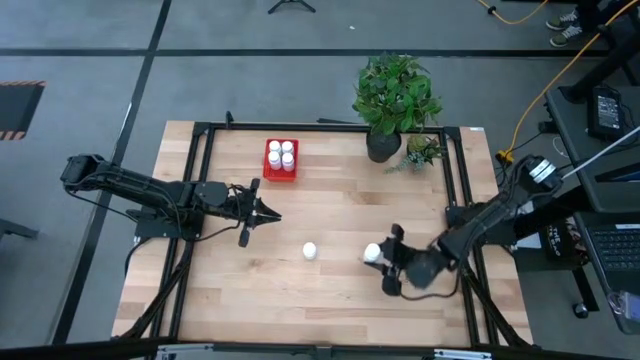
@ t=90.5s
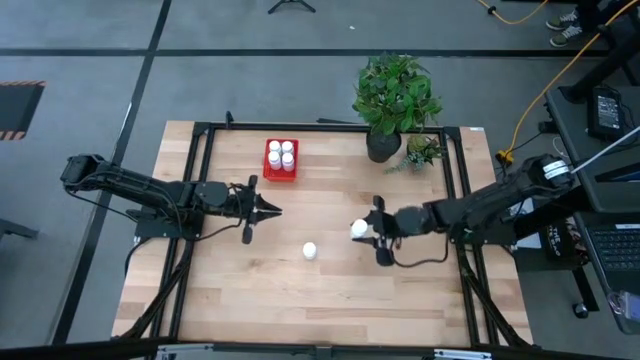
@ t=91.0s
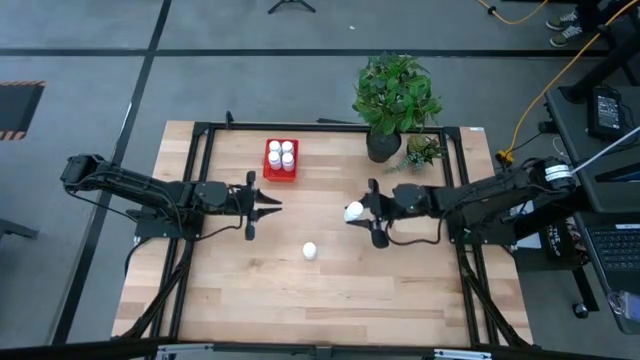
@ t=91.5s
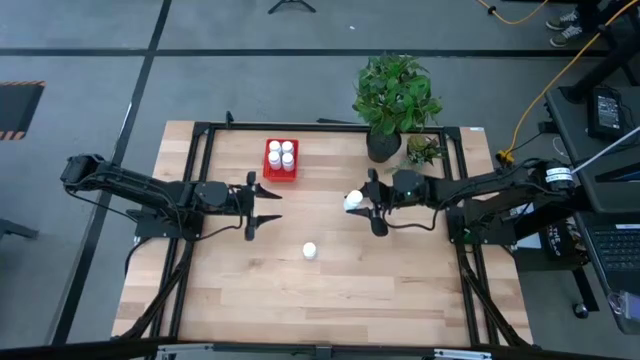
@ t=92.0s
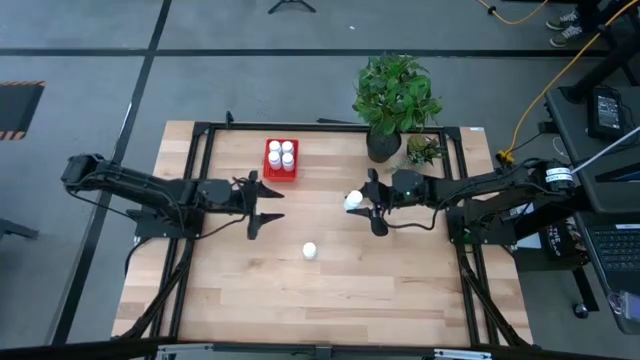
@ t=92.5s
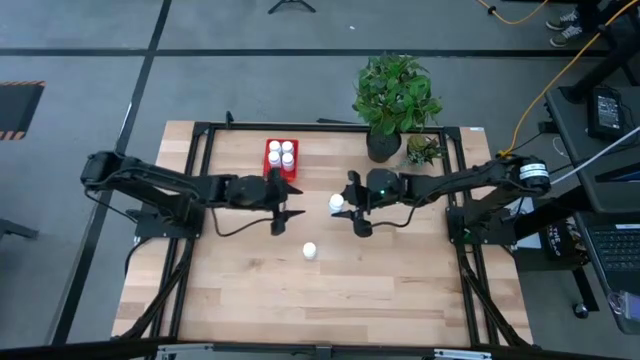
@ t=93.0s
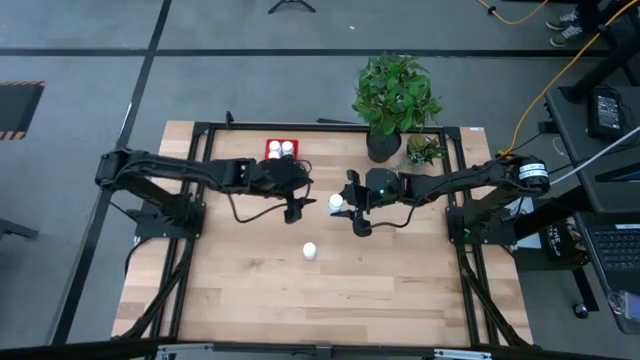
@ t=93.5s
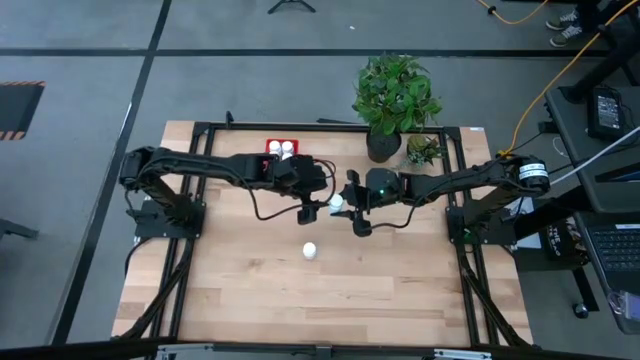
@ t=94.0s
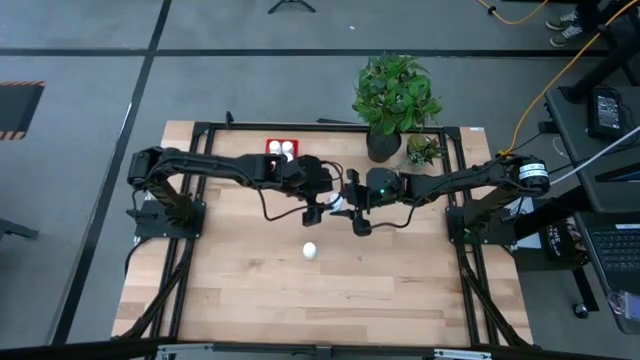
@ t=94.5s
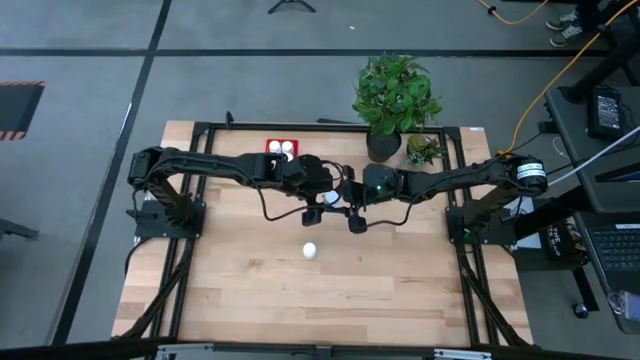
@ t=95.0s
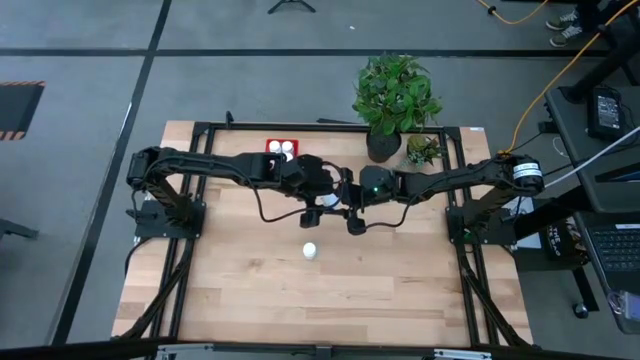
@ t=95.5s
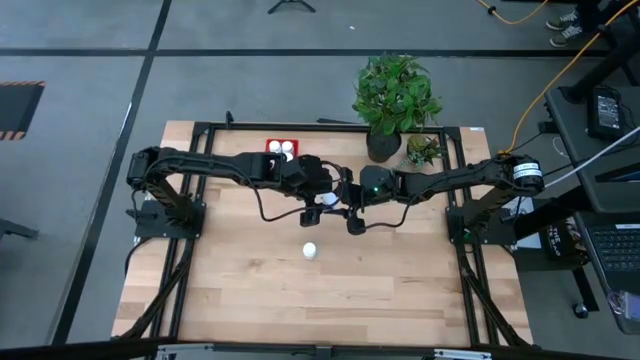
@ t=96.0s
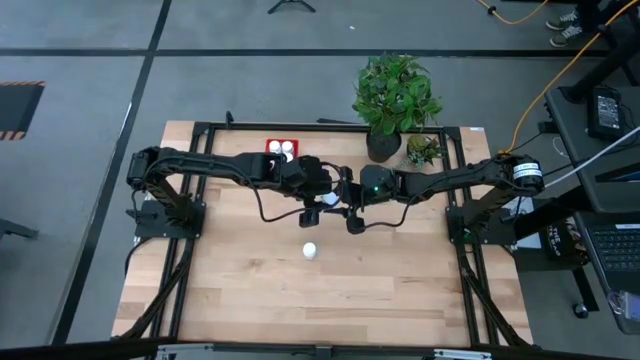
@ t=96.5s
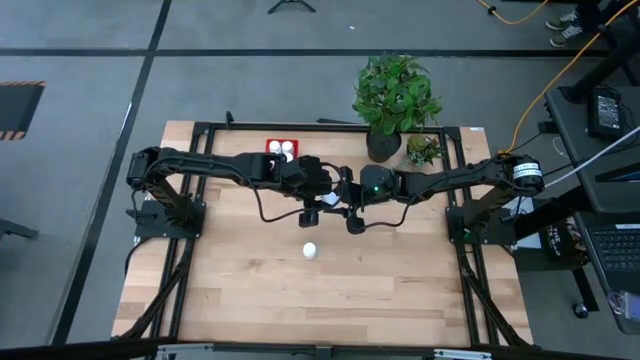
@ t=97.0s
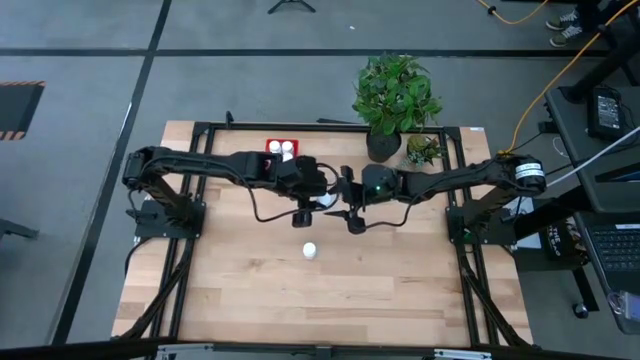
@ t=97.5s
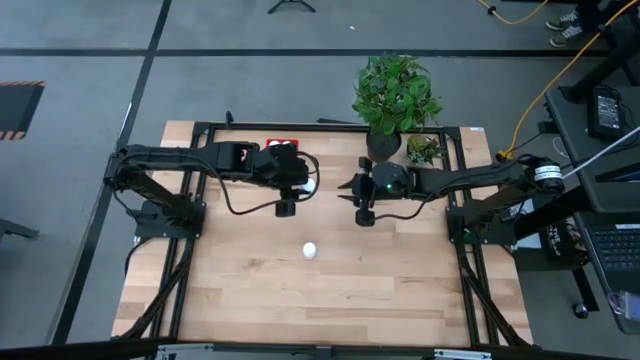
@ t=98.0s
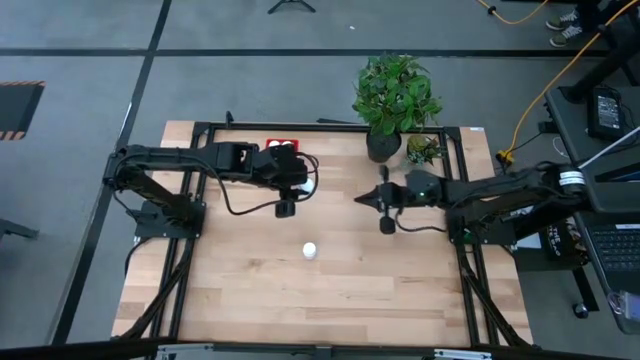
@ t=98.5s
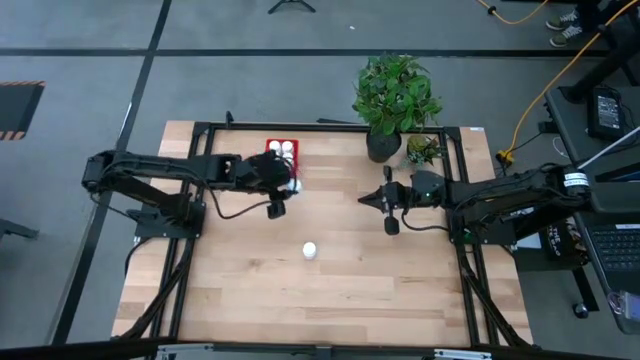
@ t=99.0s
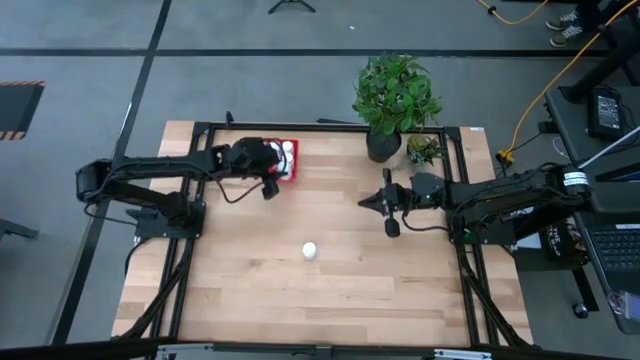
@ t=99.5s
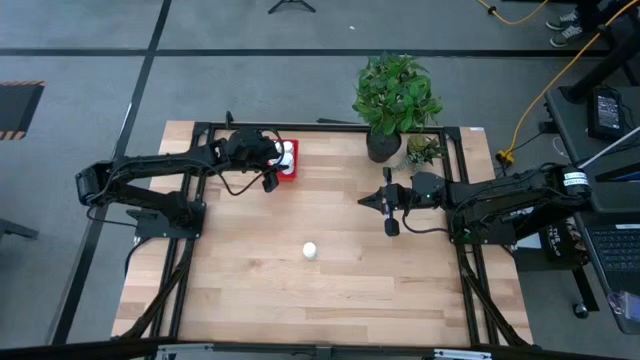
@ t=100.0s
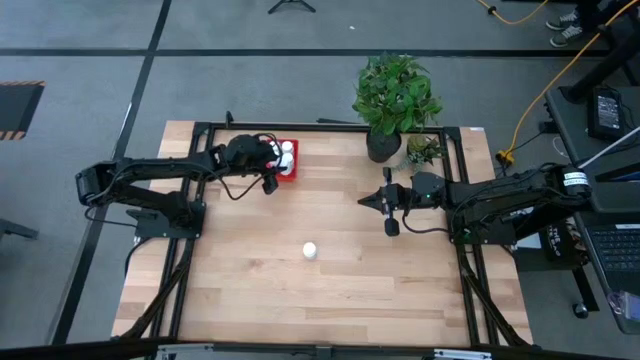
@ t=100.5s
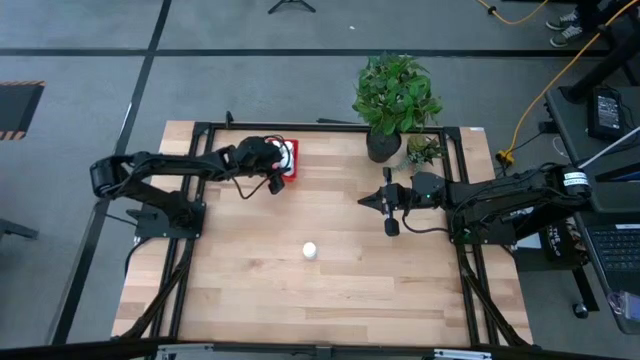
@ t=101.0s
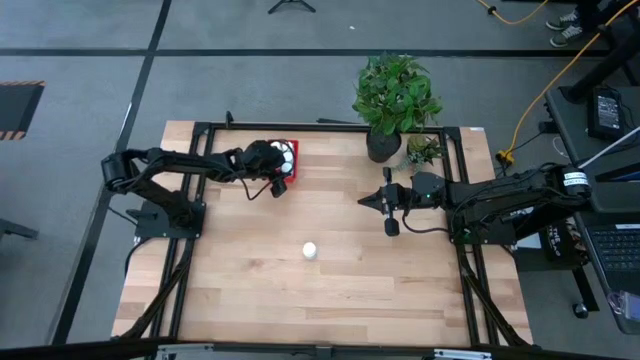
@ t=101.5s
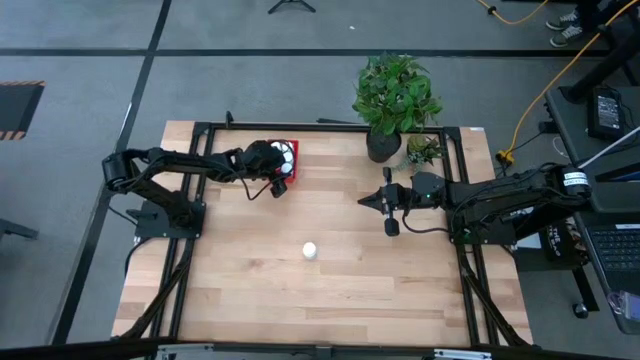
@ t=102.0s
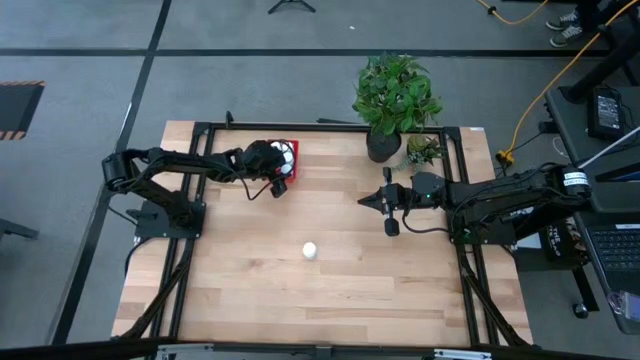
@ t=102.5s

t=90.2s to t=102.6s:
Task: Pick and place pill bottles into a basket
Put the white pill bottle into the red bin

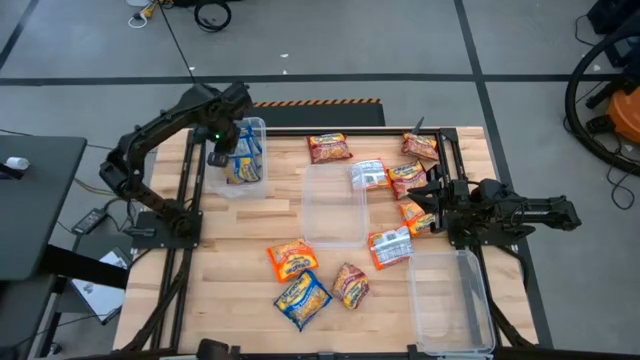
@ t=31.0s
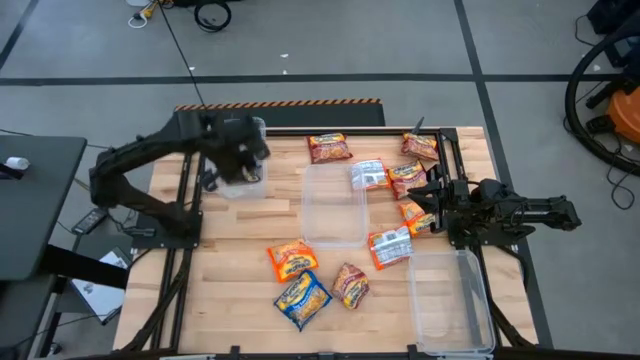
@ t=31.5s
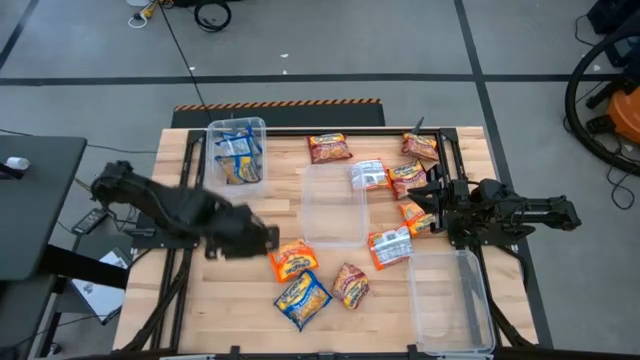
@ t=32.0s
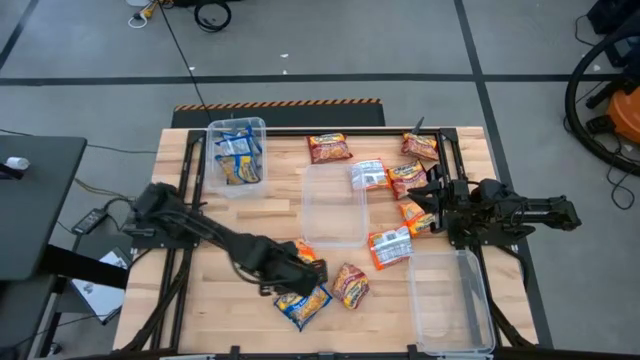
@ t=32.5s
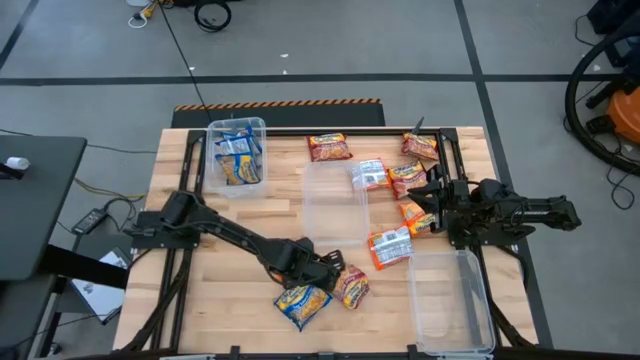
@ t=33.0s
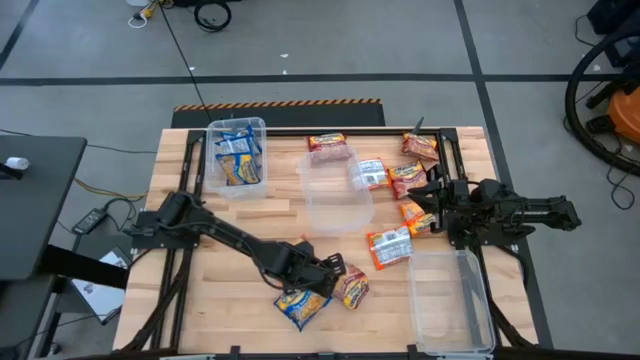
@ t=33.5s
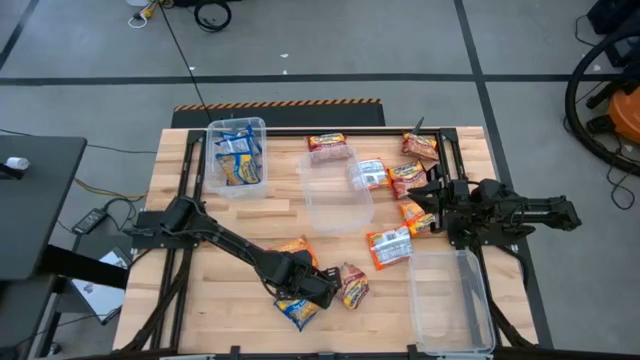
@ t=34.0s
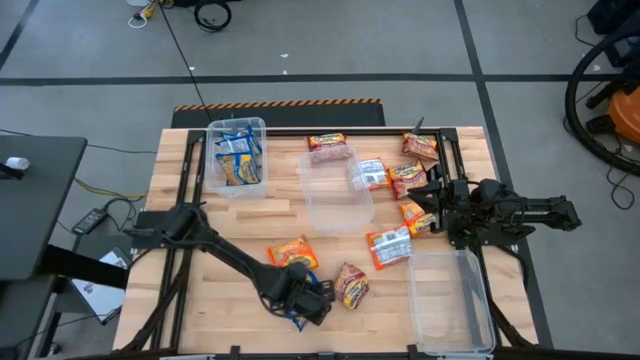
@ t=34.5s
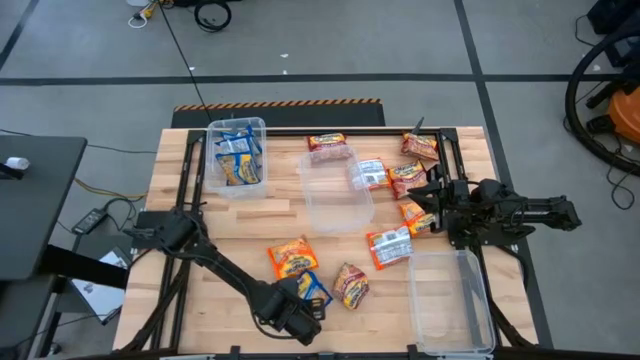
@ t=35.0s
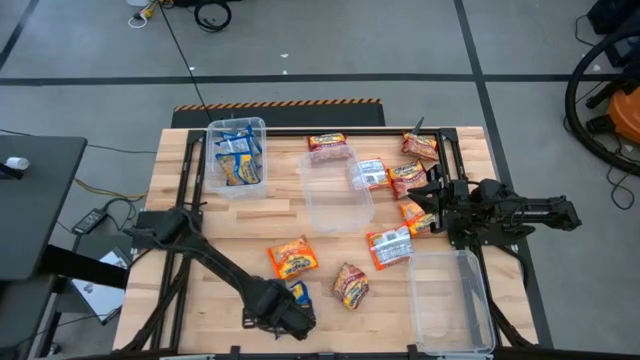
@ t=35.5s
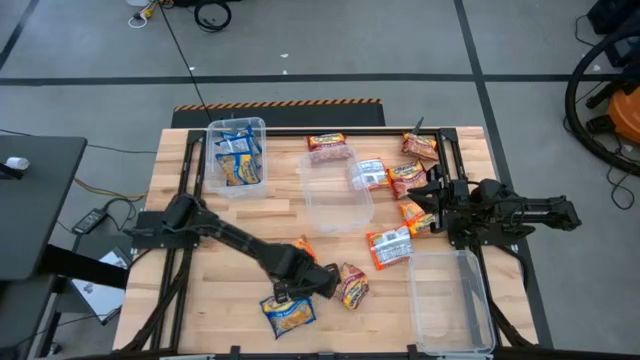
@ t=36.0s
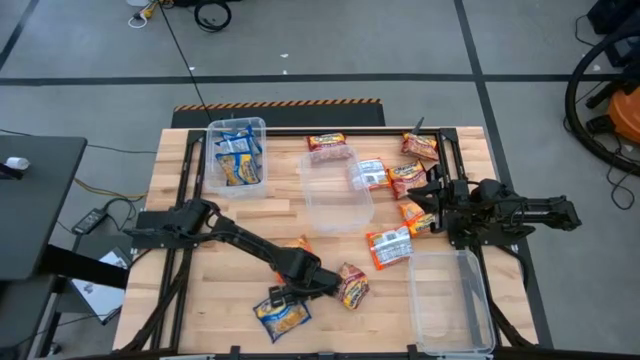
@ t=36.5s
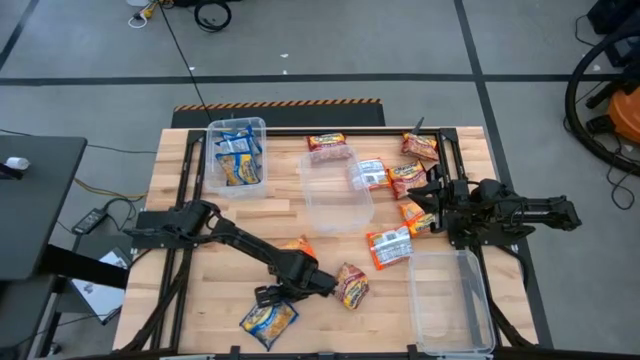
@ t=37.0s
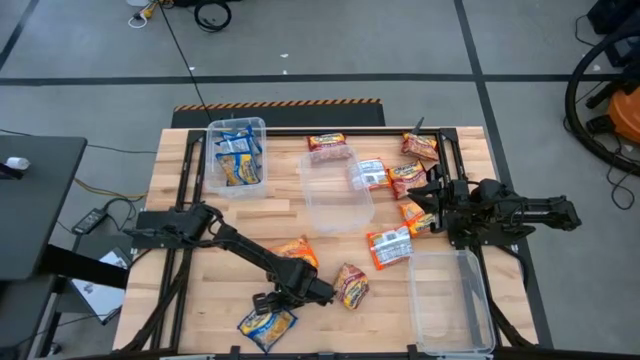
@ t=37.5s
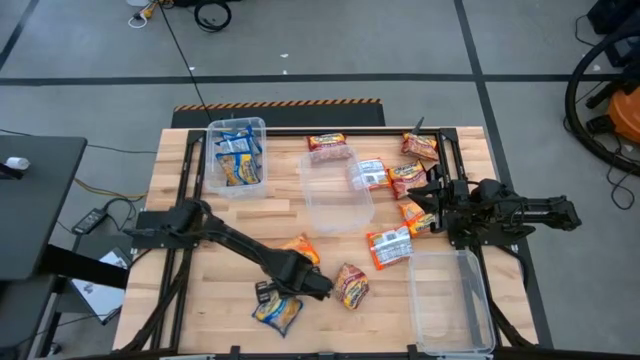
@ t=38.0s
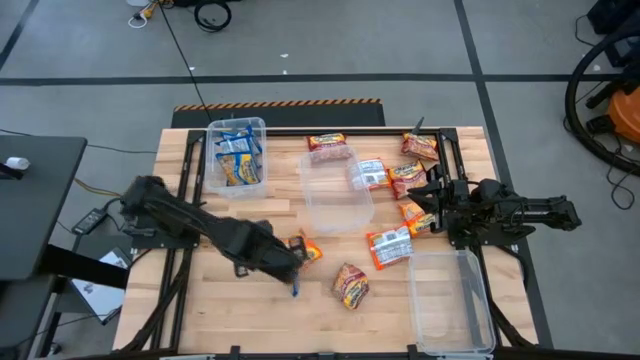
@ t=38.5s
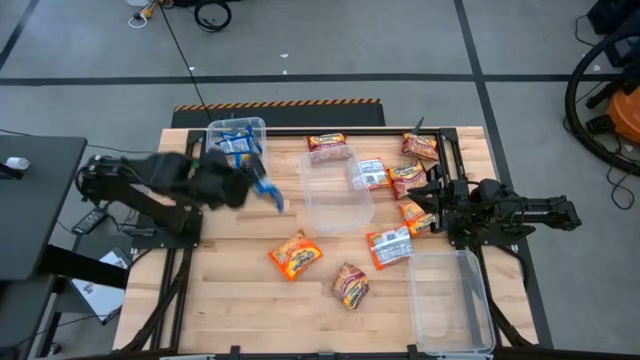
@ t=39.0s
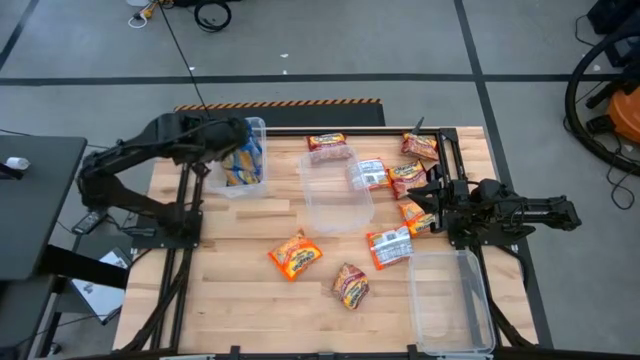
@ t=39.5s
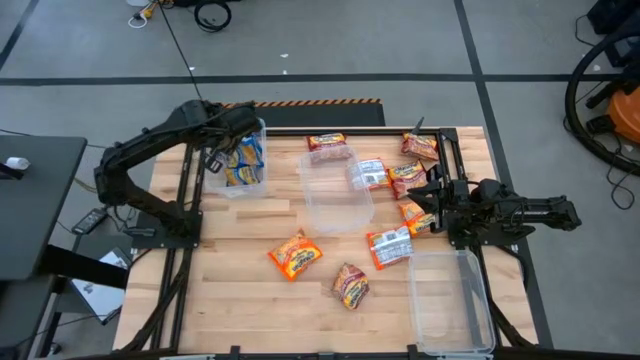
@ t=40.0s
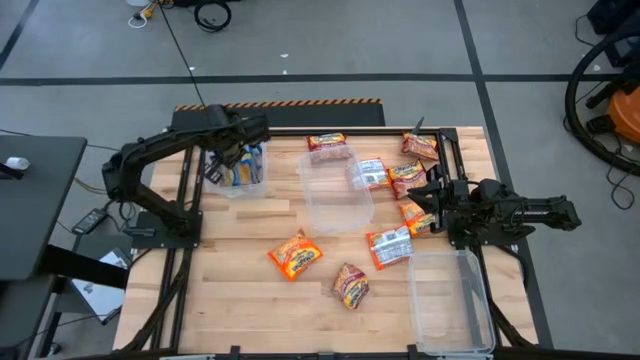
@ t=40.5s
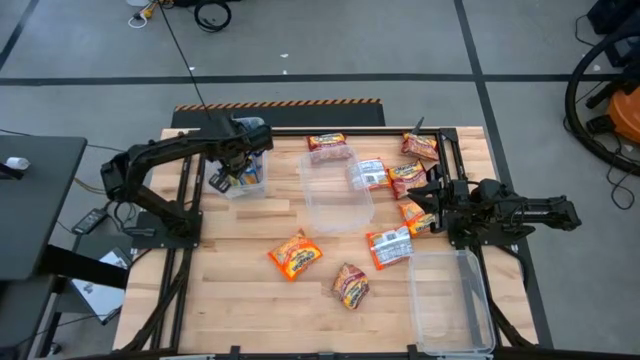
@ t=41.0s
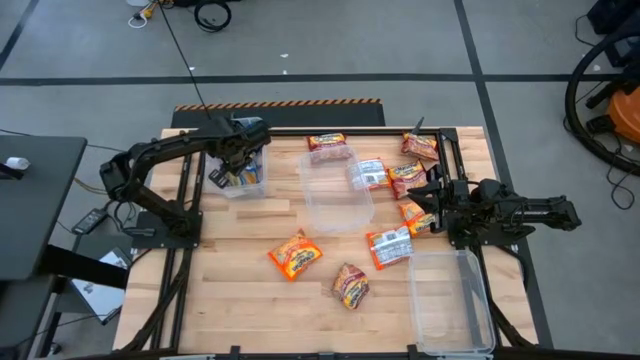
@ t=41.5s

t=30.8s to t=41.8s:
Task: Sort Maruchan noodles
Put the blue noodle pack into the top transparent bin
